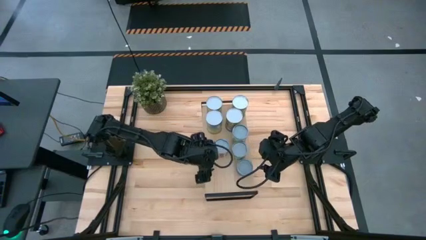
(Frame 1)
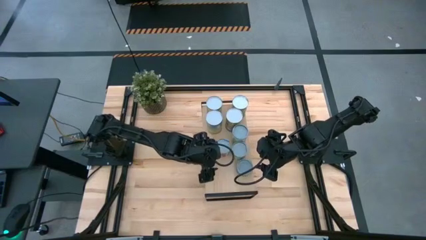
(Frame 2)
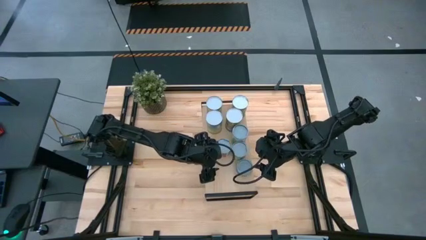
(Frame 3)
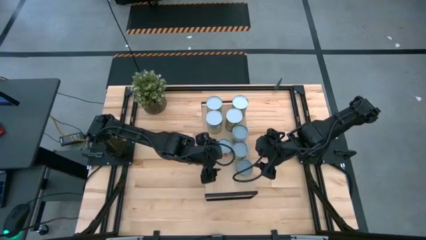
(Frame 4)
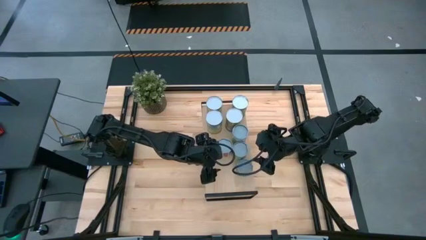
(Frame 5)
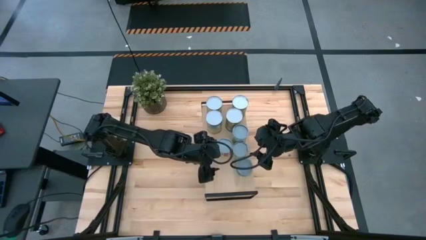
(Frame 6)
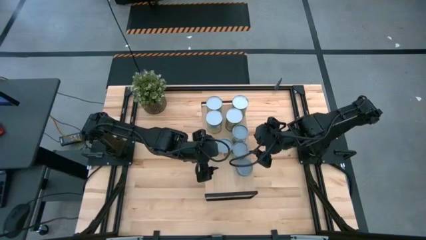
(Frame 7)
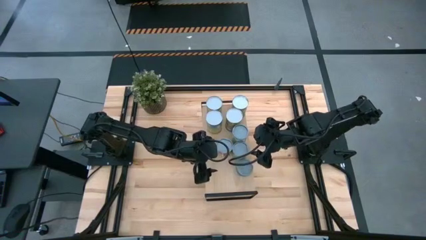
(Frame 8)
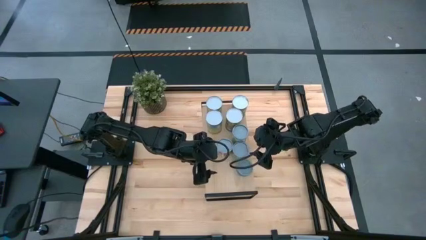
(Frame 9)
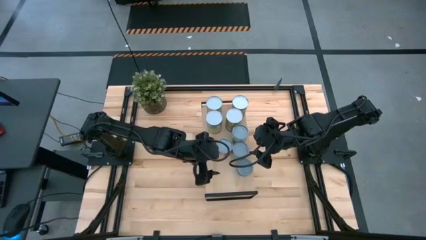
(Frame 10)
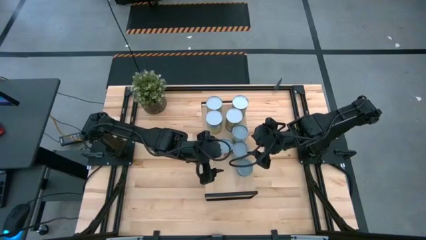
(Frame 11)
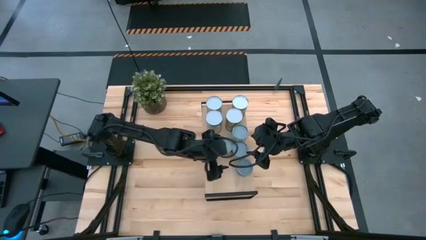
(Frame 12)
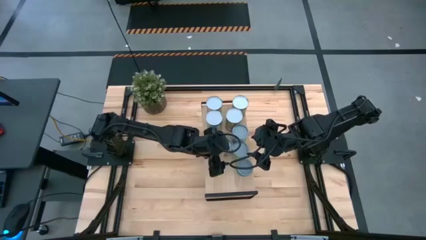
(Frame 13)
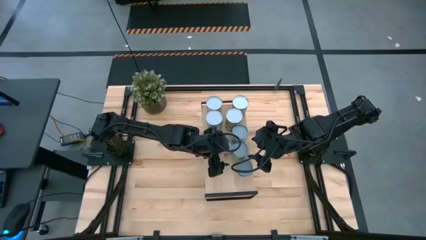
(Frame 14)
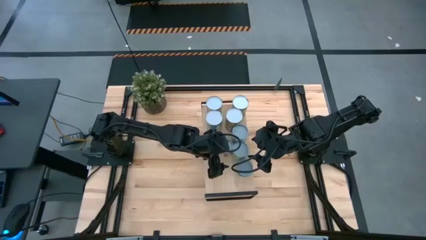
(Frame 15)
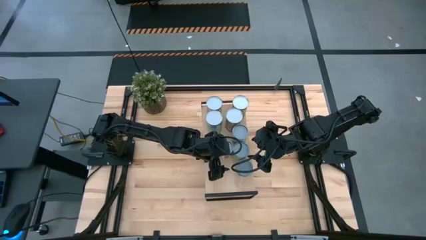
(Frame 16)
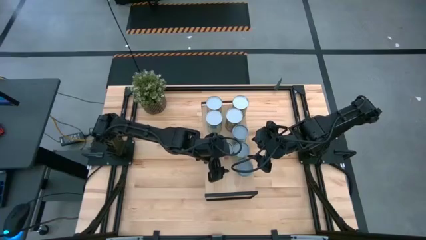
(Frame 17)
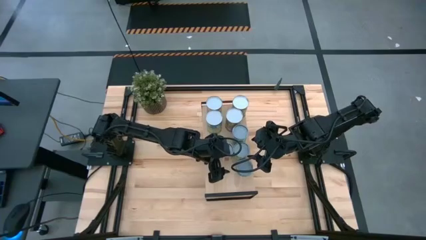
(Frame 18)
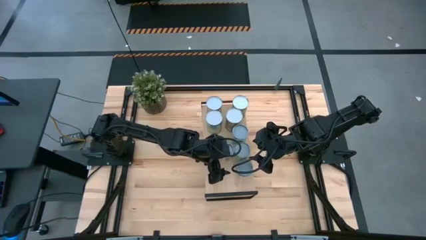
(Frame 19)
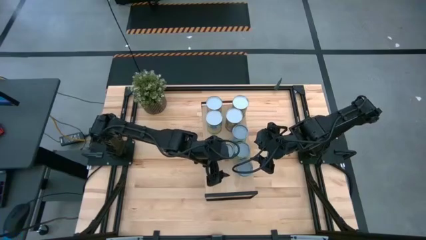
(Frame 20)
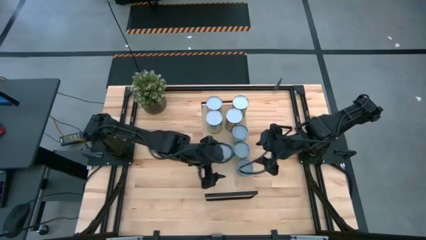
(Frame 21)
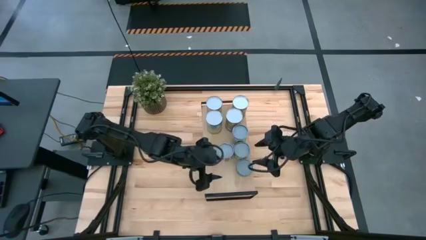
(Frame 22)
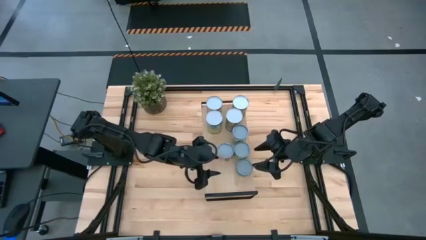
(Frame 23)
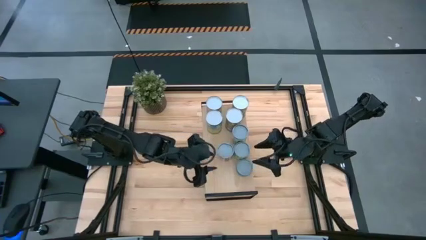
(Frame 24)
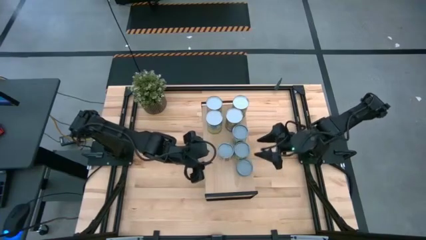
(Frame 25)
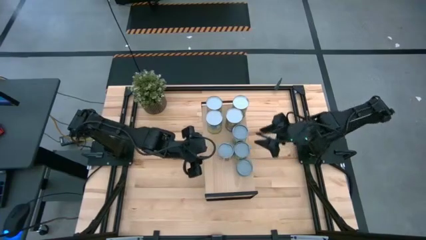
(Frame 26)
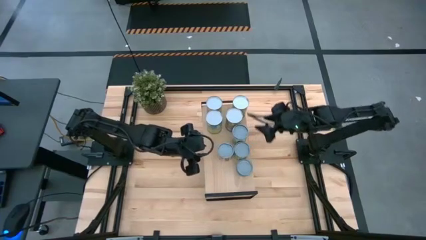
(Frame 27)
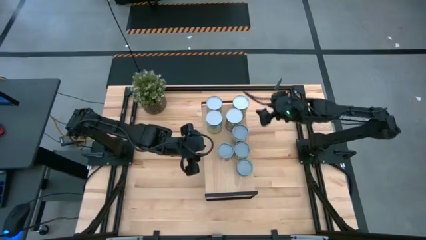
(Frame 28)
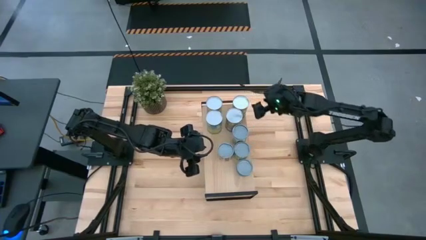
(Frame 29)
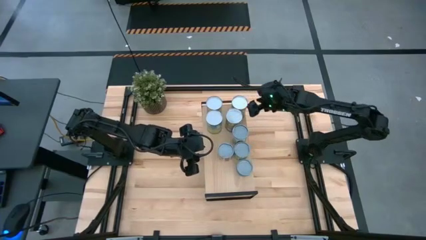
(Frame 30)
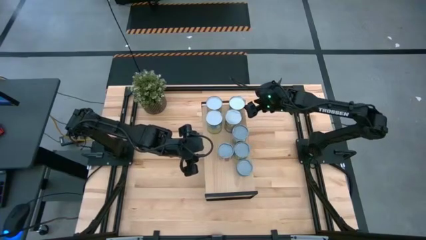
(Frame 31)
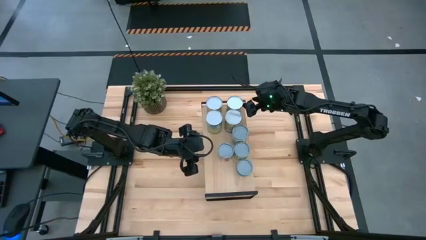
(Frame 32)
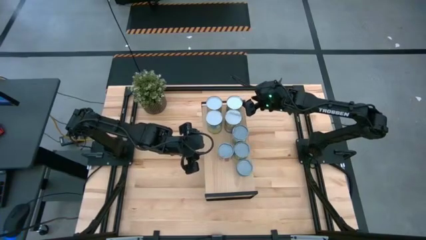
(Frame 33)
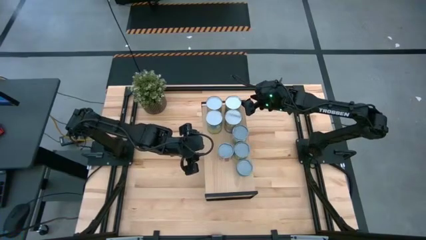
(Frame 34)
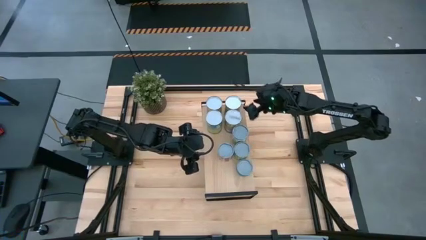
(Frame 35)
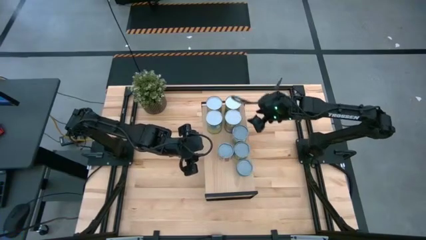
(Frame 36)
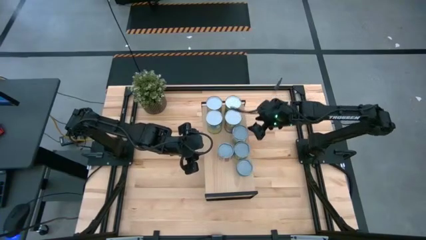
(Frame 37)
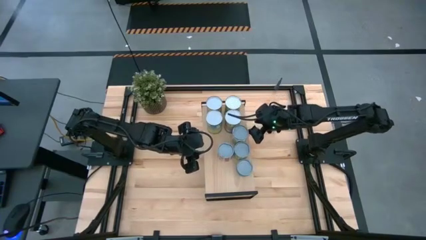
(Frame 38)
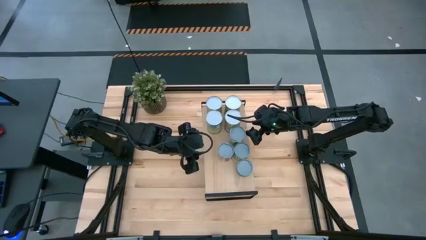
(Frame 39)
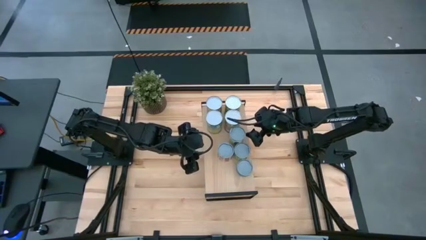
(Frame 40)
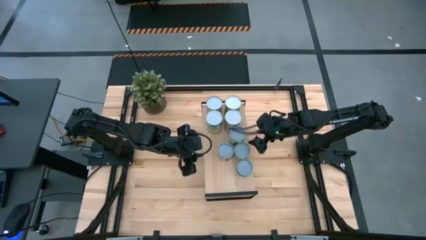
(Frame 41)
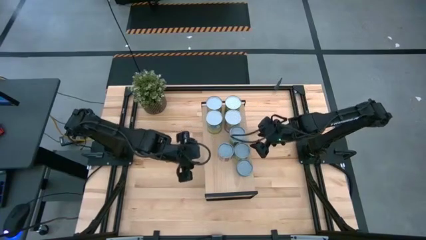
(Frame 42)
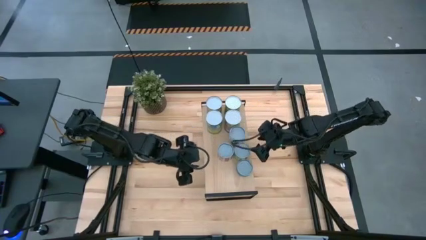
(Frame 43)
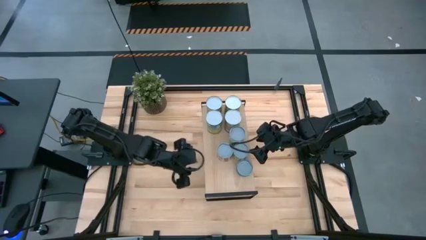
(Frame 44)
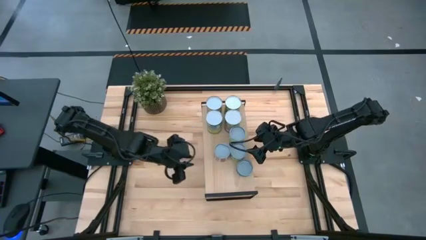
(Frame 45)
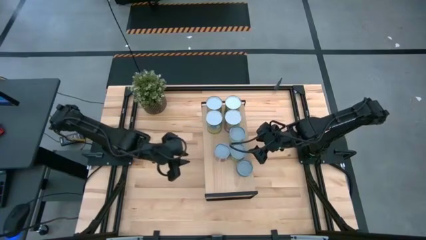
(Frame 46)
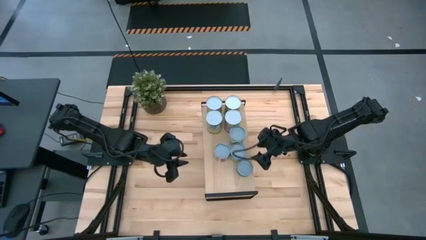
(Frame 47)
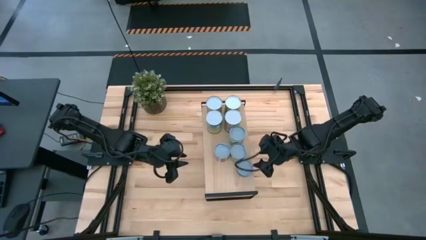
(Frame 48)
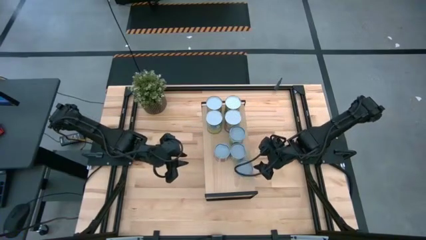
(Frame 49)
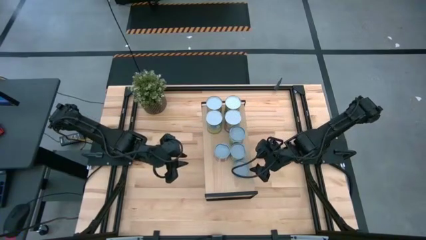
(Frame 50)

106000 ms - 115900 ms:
Task: Pick and place cans onto a shelf
Adjust the cans on the shelf

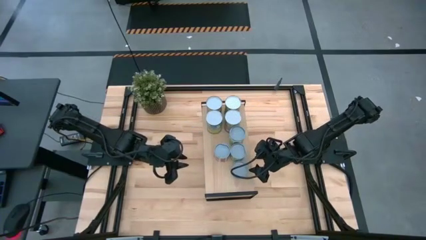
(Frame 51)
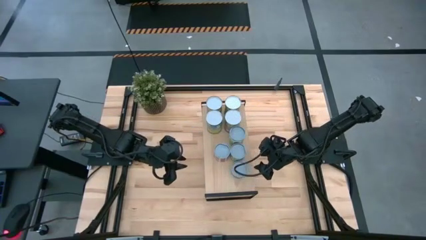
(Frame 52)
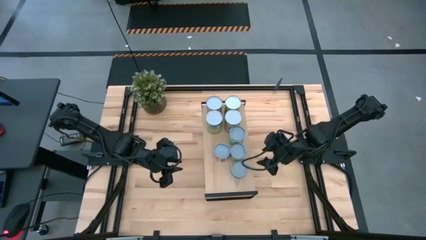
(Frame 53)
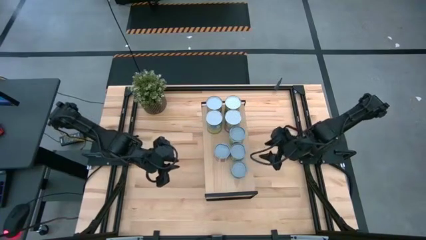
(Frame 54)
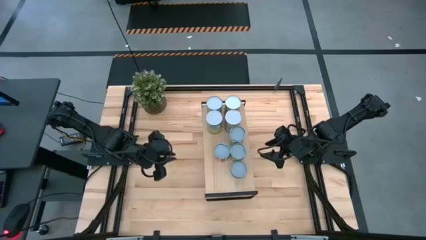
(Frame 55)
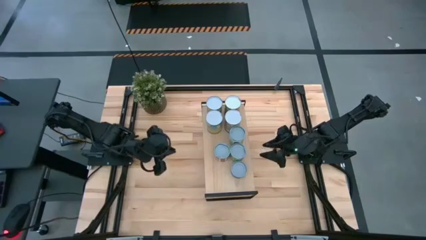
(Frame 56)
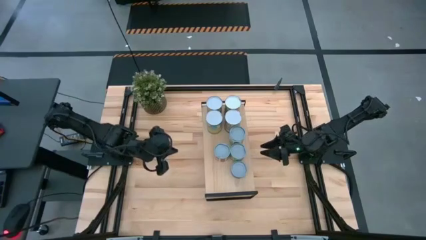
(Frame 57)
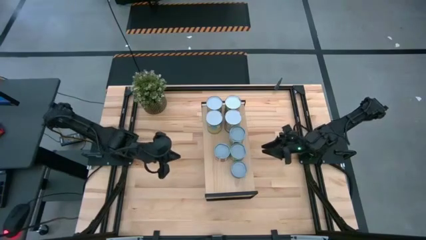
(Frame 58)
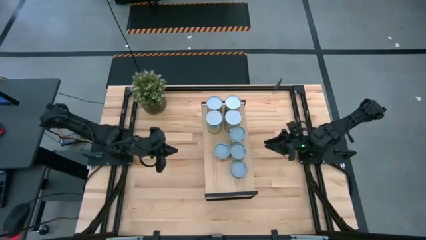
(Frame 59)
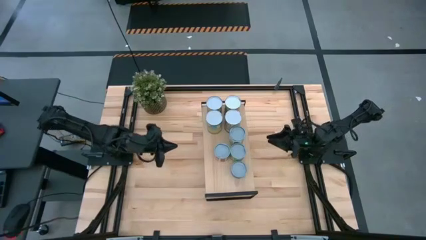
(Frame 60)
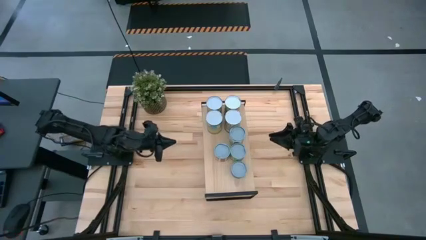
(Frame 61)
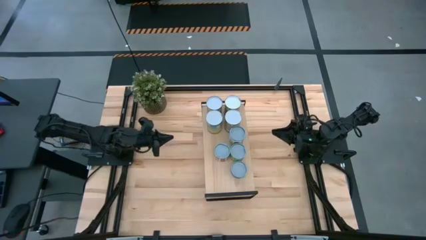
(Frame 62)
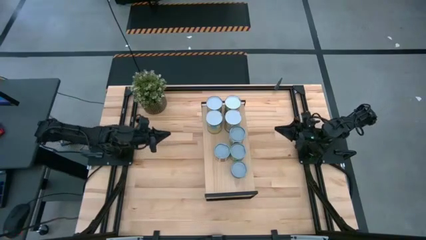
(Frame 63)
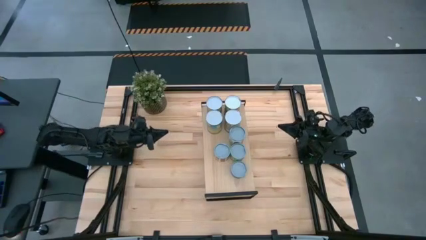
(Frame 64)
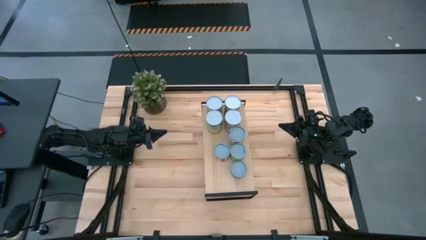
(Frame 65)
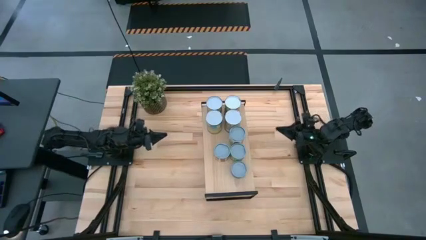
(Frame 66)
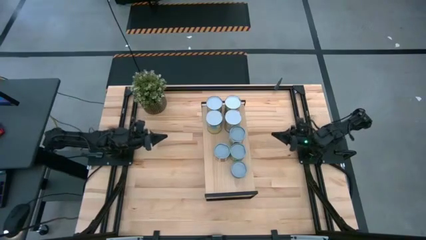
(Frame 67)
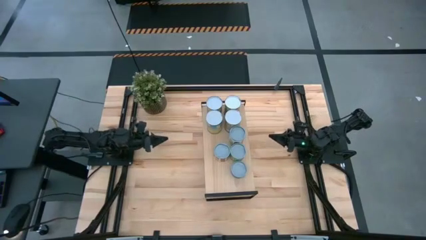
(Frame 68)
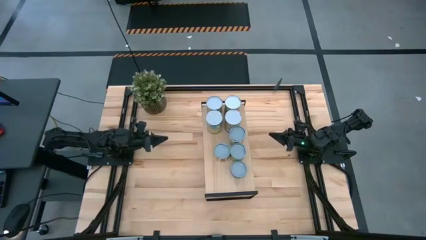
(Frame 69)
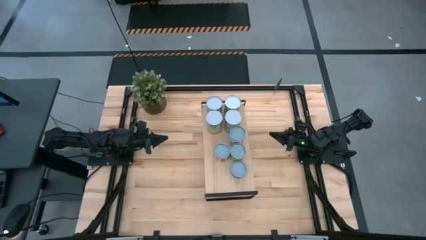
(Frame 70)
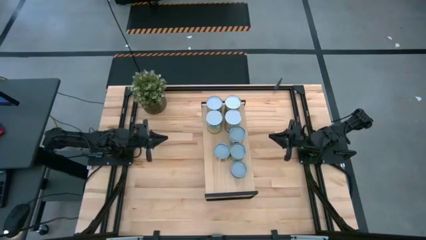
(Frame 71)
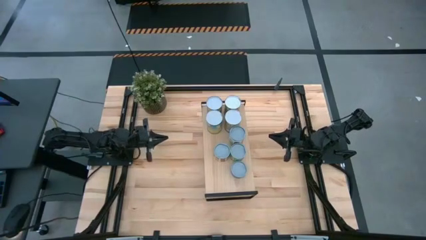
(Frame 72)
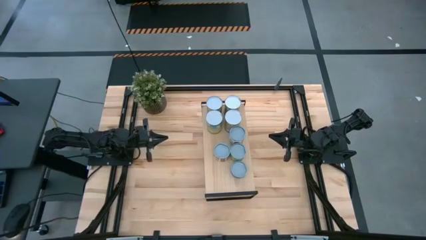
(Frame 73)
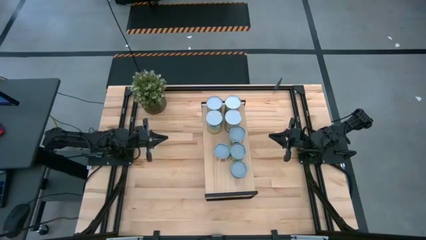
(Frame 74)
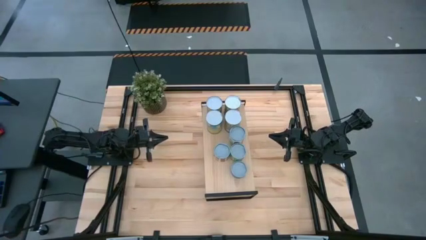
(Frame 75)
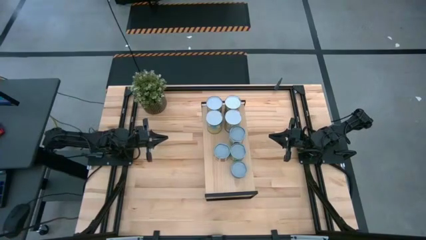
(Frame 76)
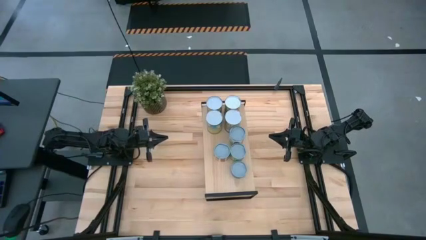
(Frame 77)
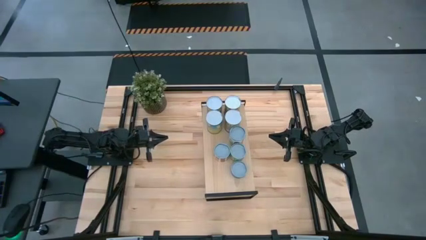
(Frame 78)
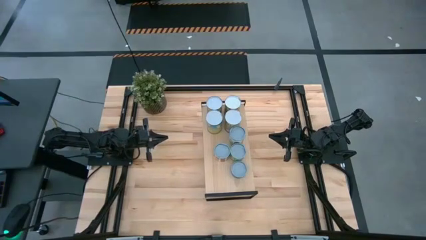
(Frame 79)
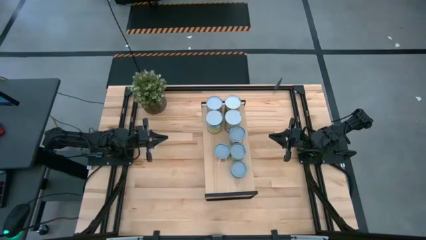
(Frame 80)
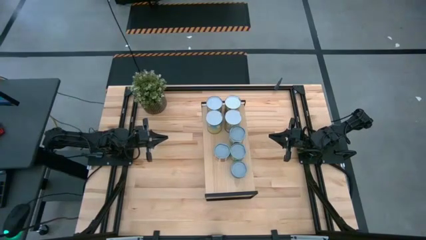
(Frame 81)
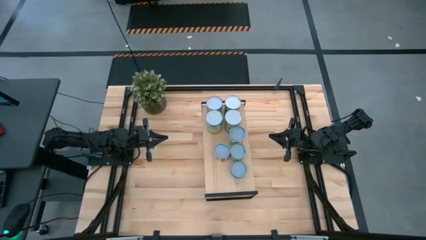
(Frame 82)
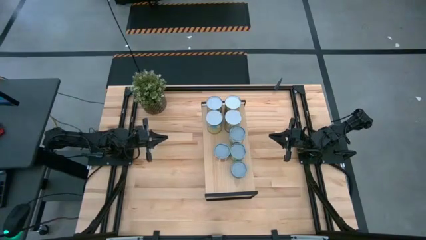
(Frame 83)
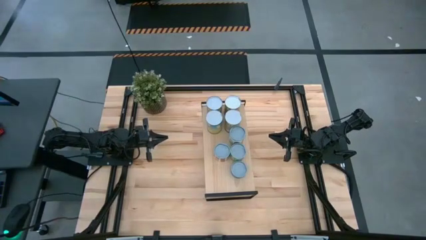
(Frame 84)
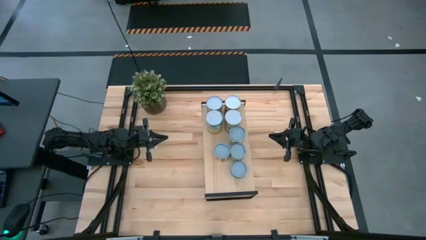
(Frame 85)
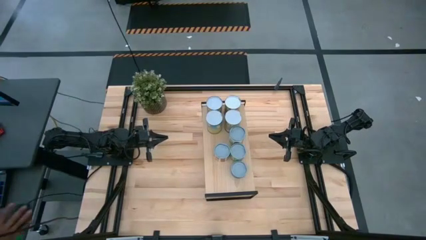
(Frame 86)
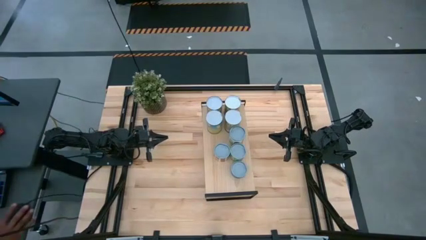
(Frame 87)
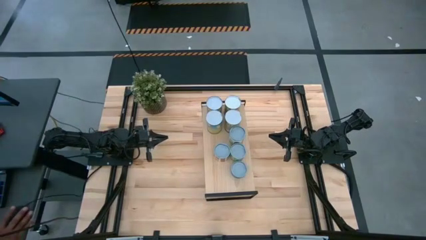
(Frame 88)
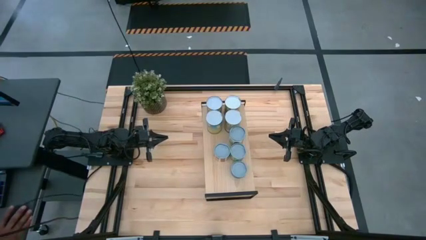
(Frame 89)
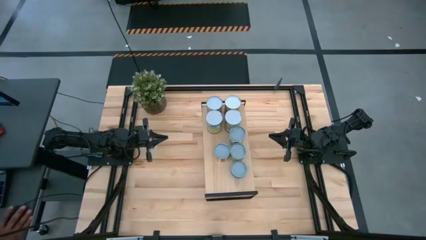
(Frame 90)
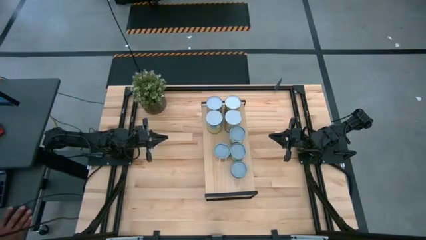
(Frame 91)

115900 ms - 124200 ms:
Return to Home Position
